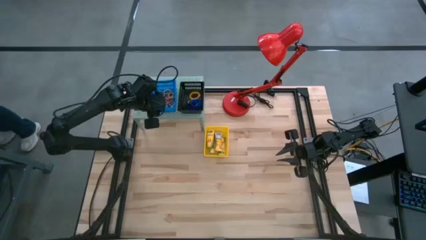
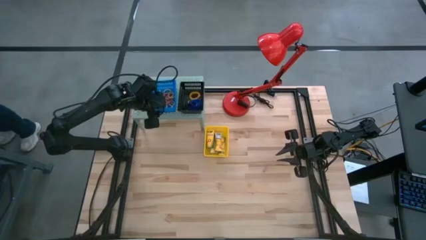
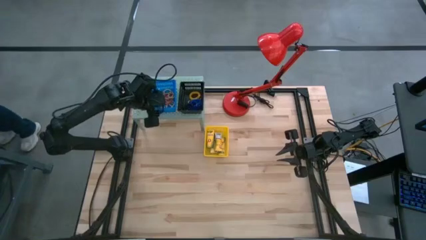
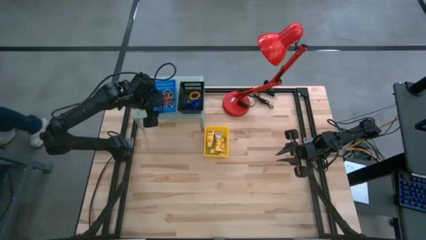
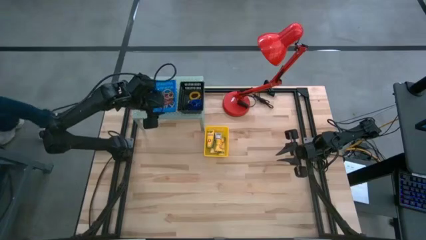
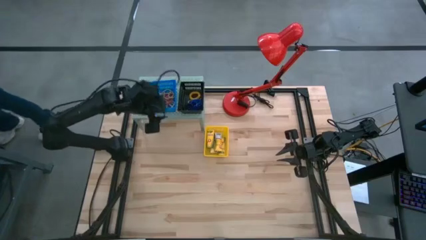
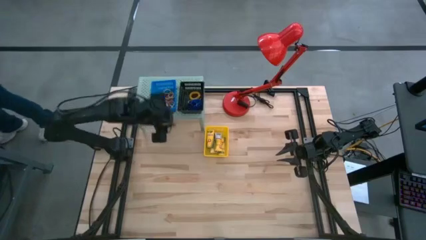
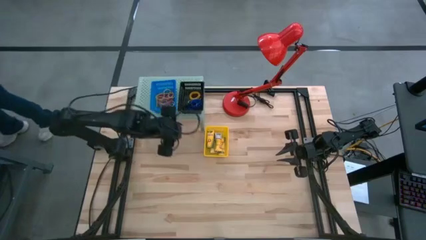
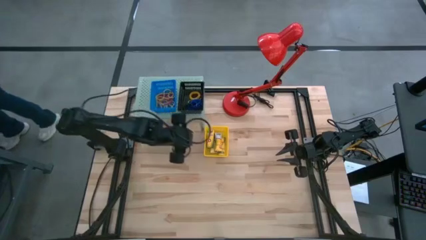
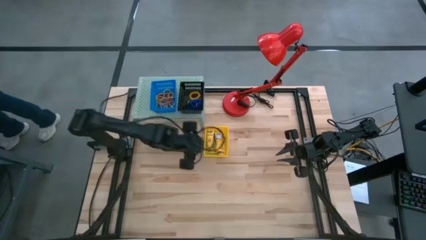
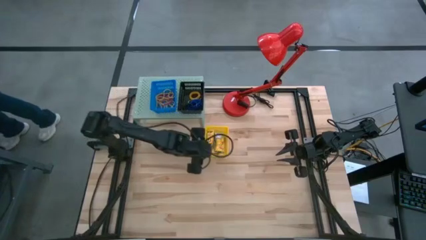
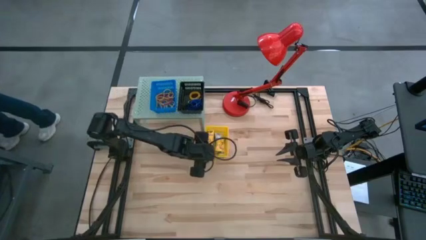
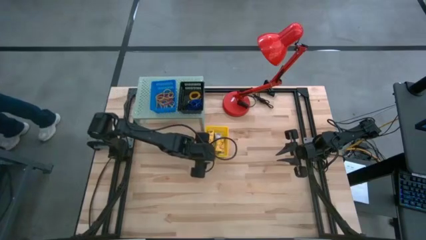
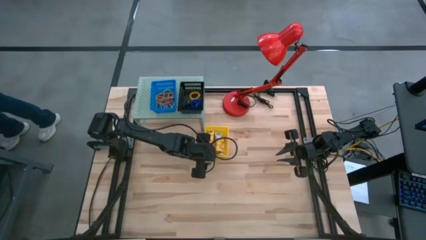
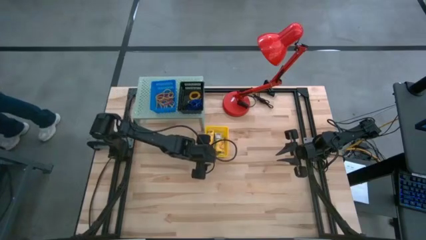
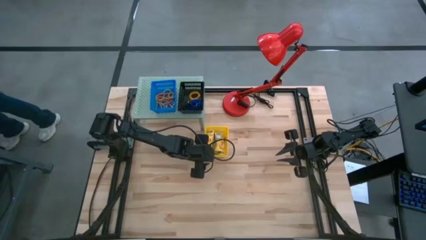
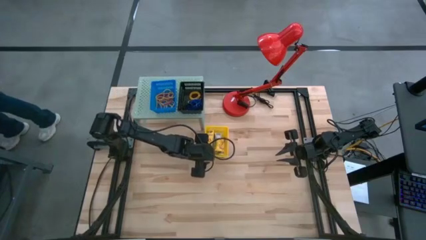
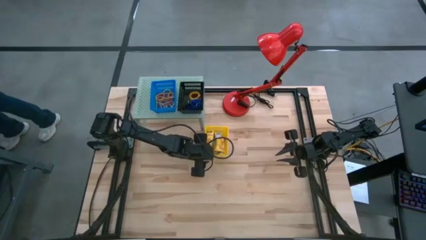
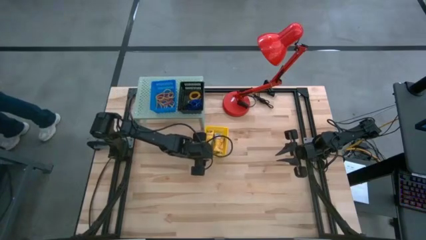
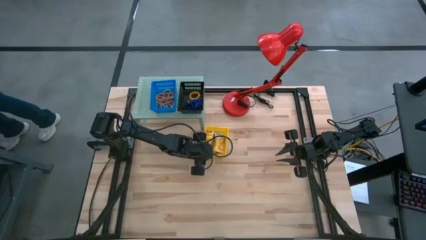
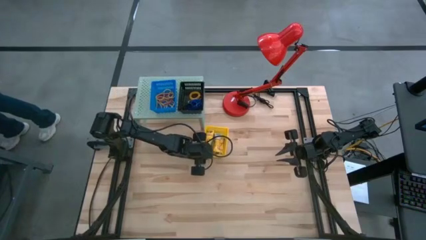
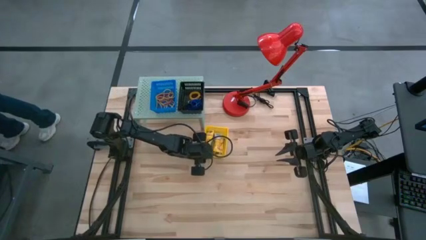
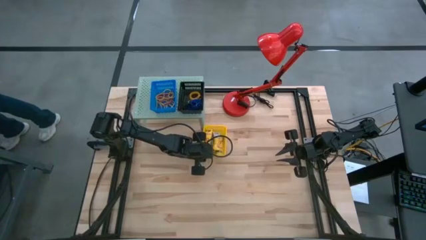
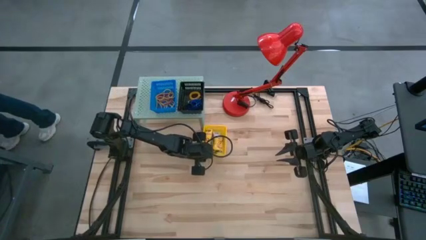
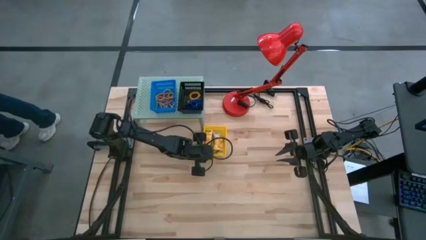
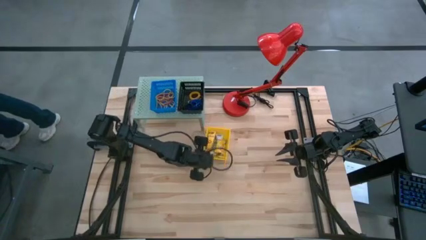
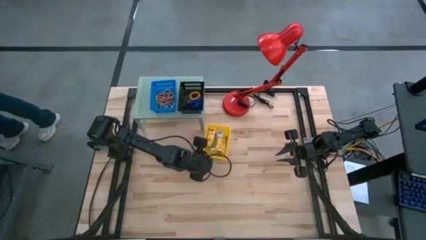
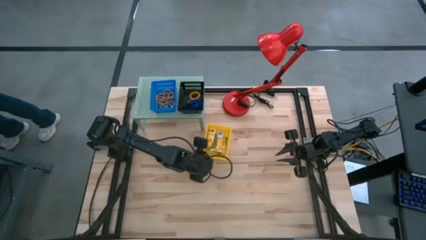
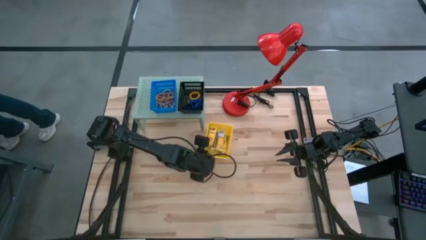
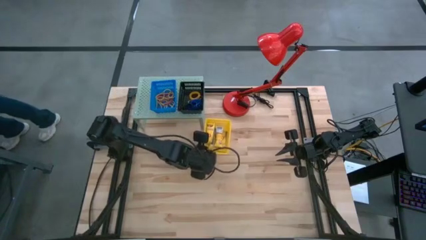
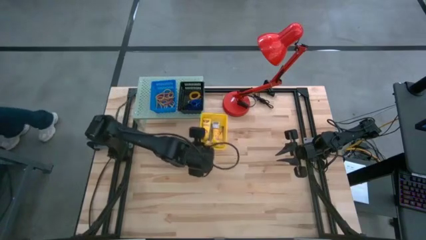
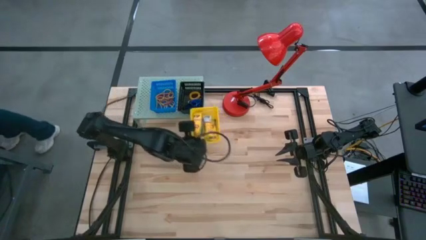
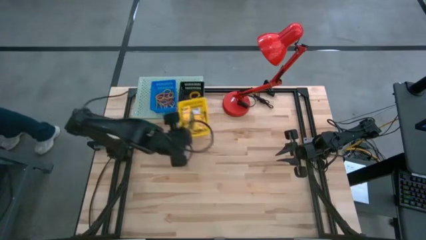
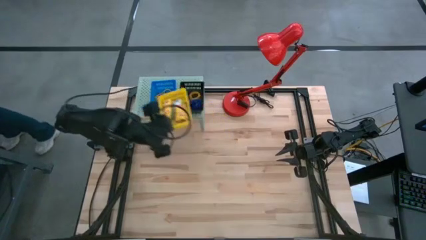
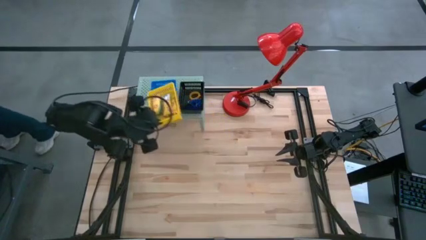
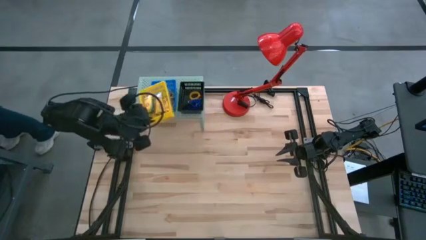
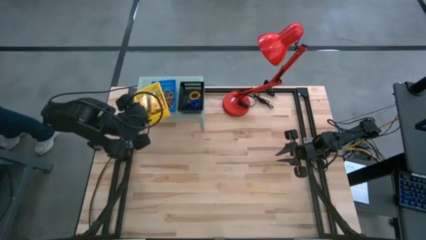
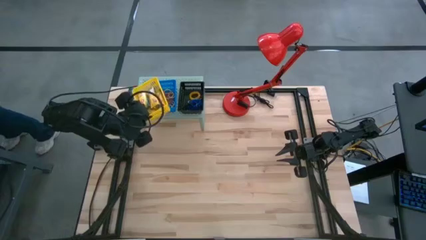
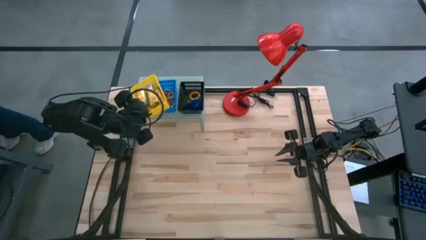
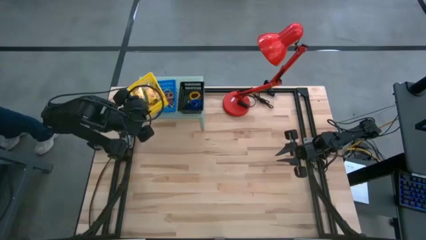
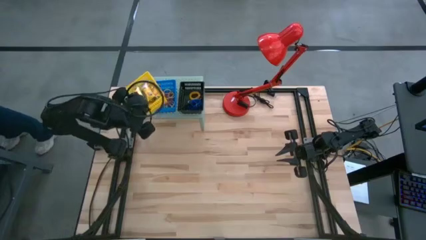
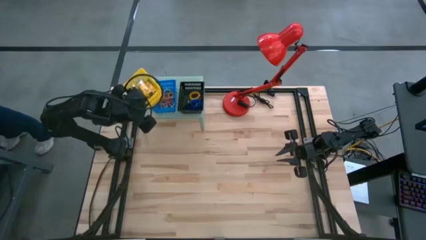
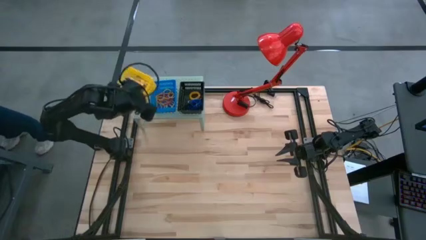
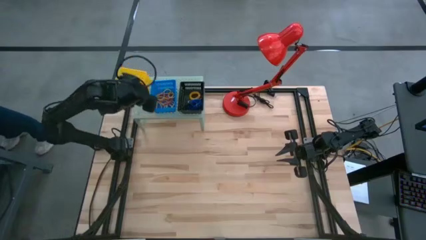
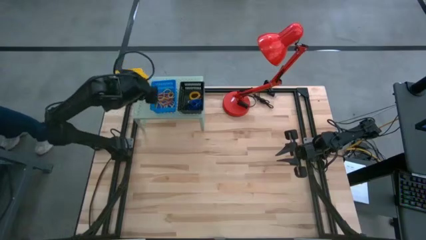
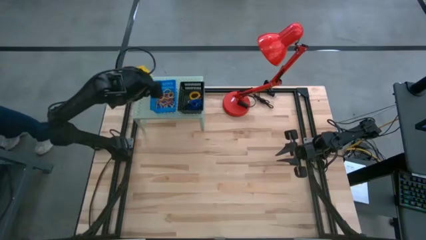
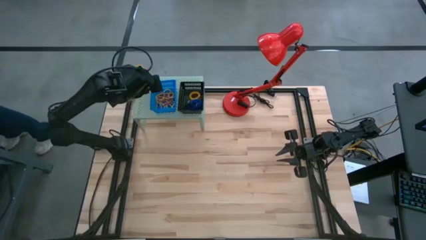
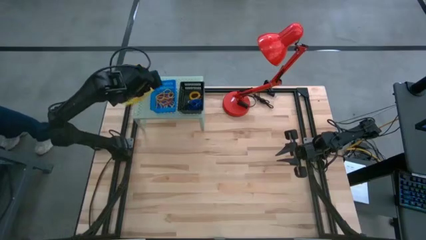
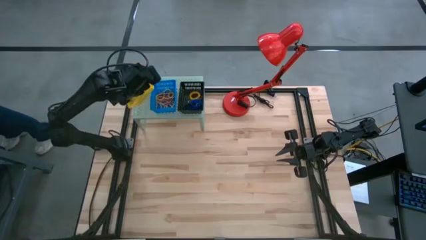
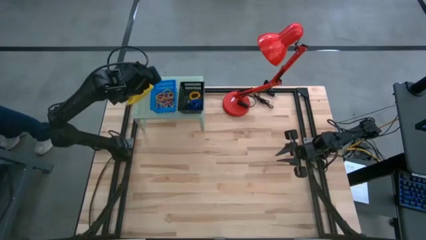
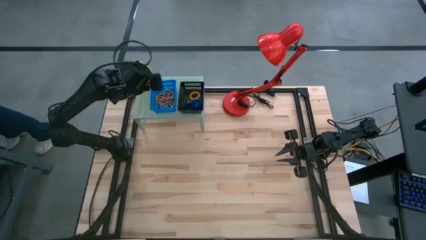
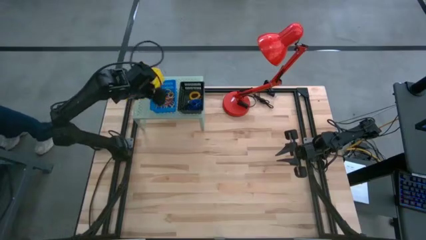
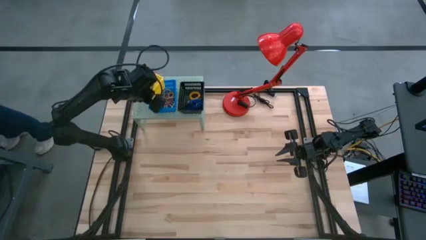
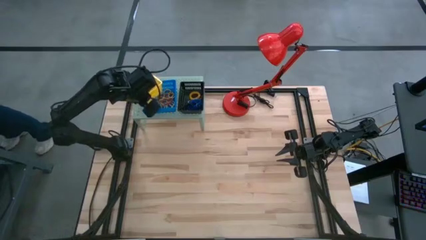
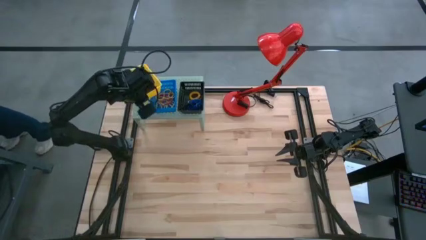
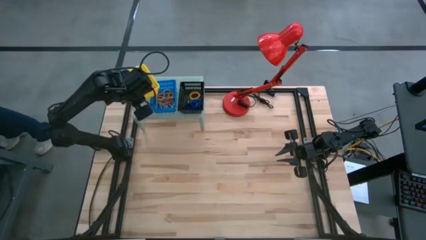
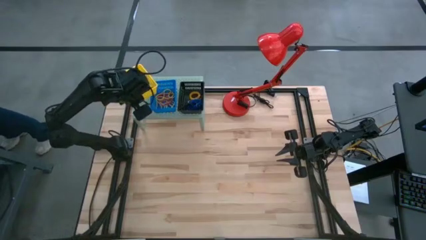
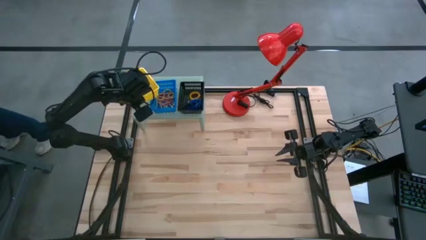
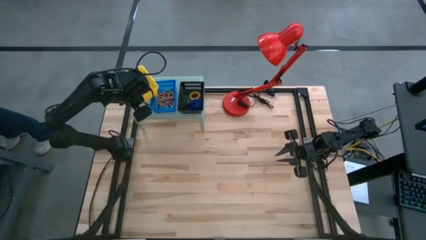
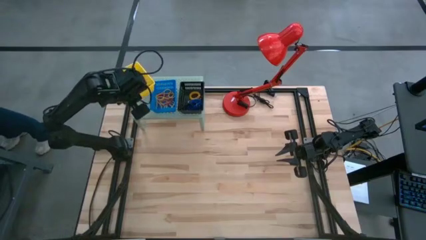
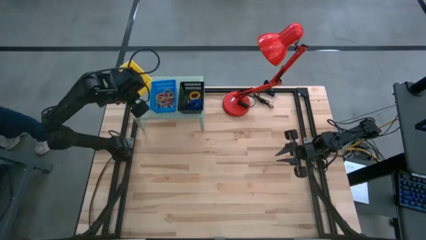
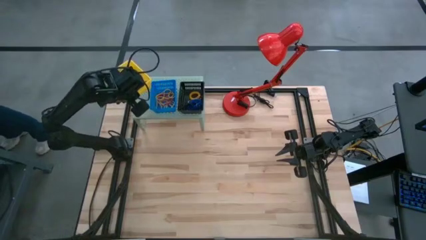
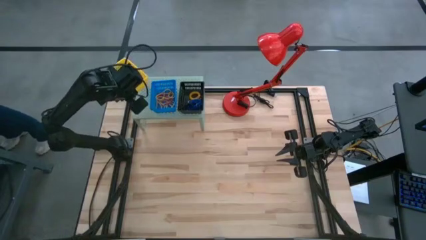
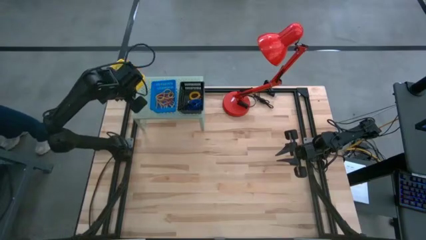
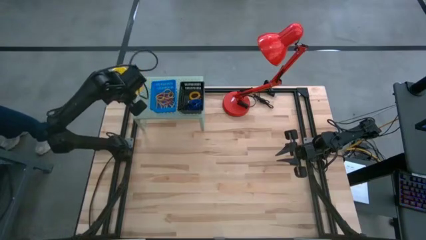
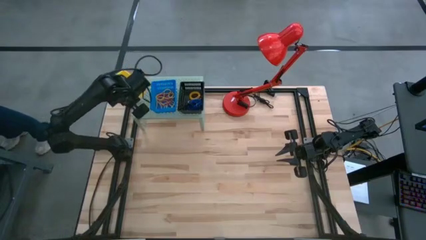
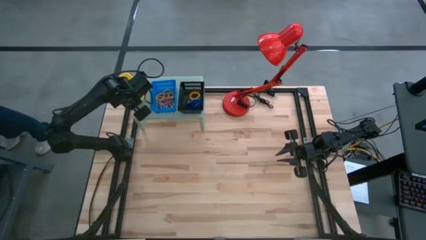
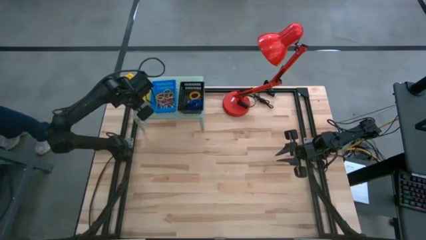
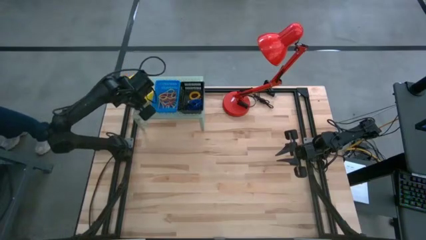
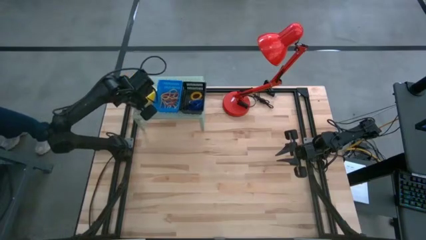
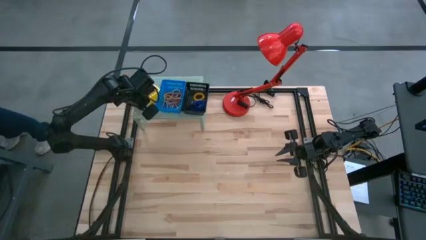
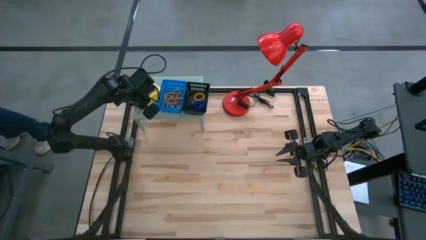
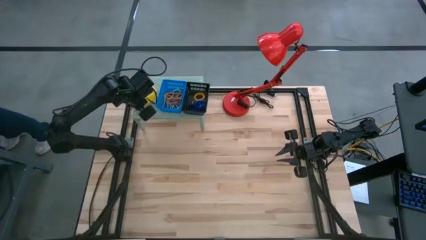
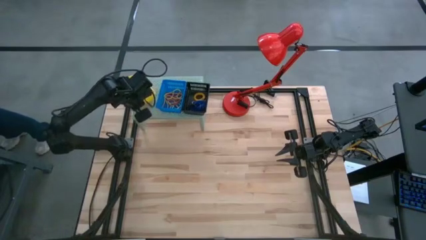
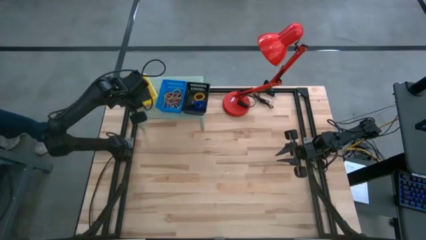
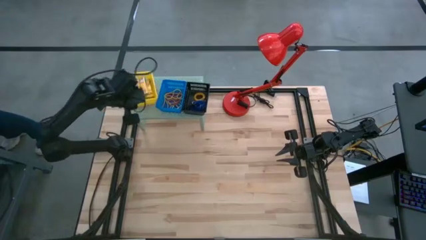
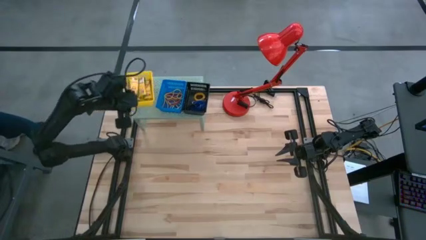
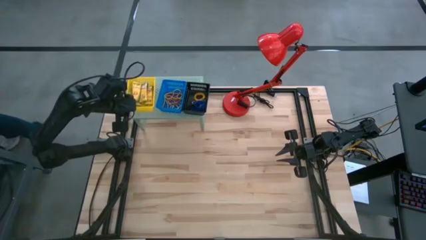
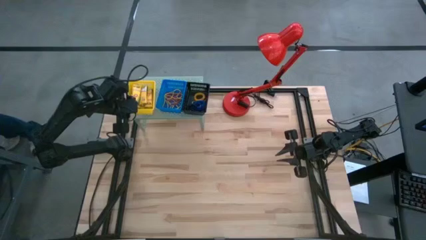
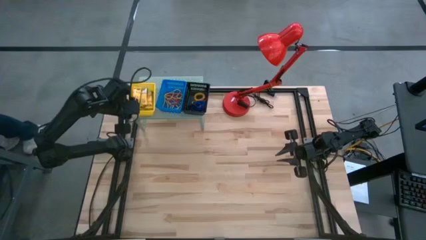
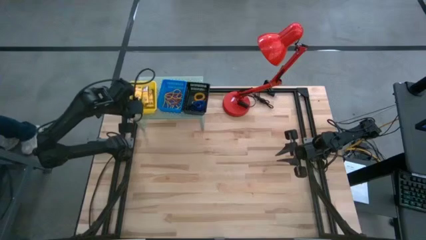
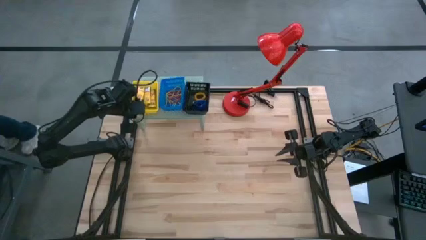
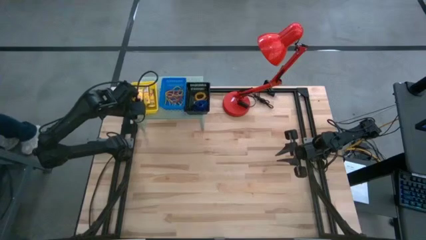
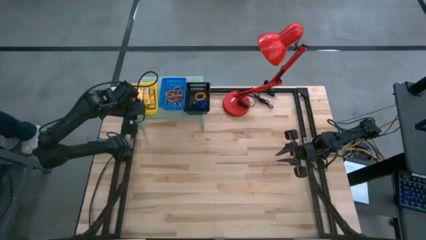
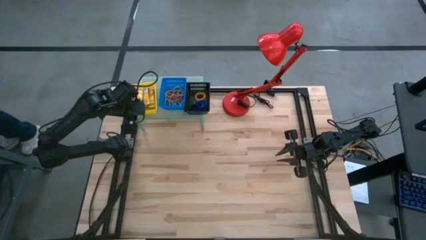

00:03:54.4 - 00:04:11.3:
Task: Pick & Place Office Desk Supplies
Put the yellow basket filled with crayon boxes on the shelf

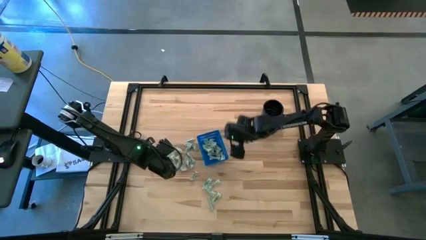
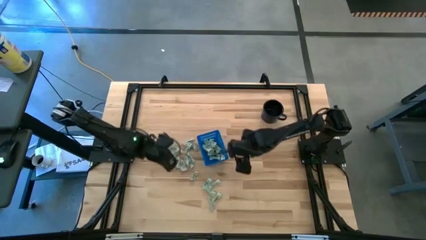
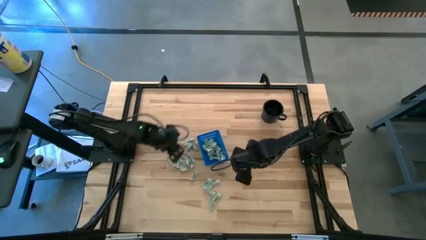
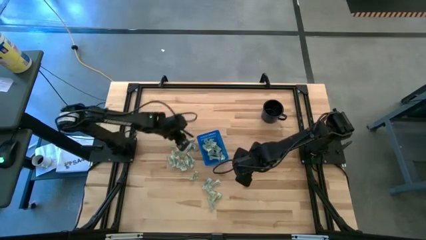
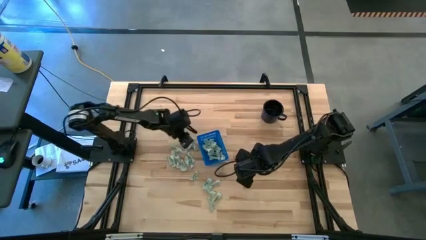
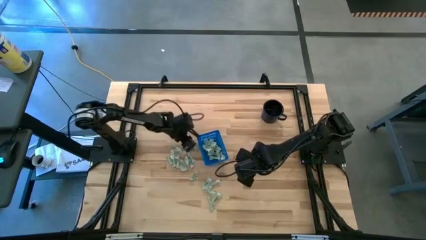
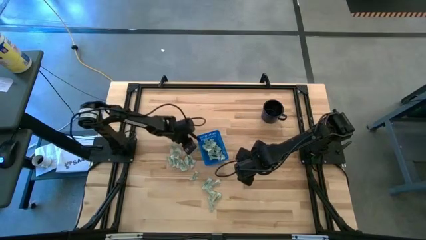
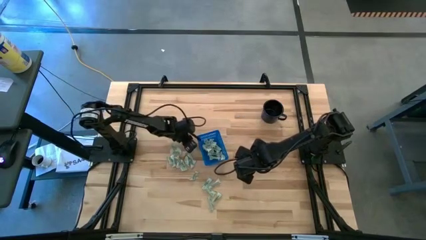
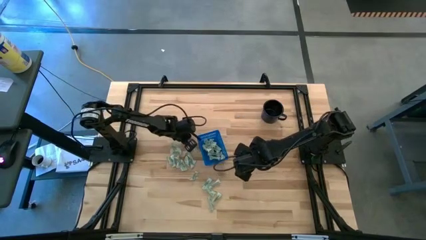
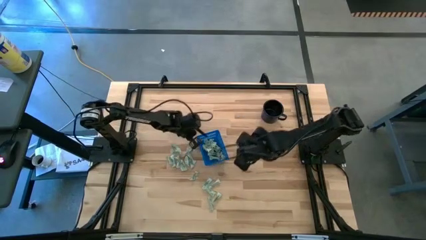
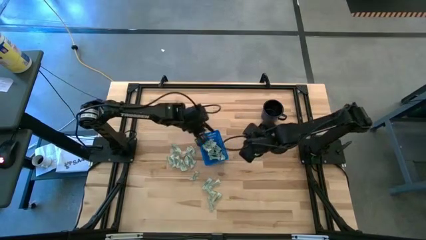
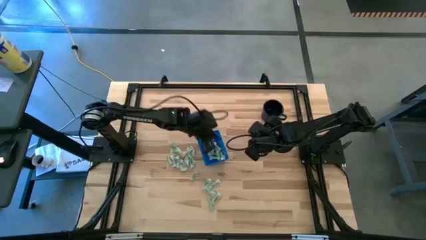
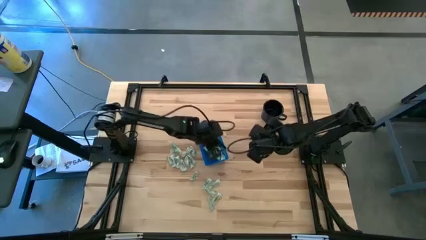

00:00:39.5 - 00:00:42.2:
Task: Pick and place Stevia / Truvia into bins
Put the stevia packet into the basket
